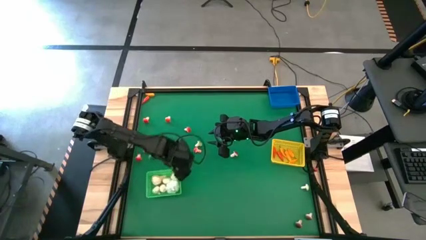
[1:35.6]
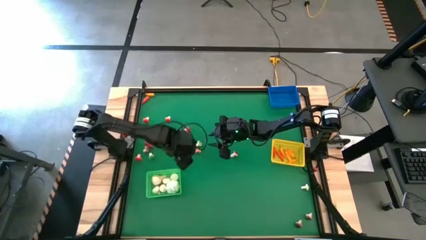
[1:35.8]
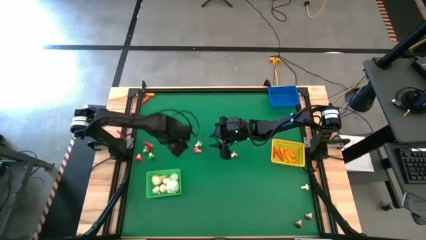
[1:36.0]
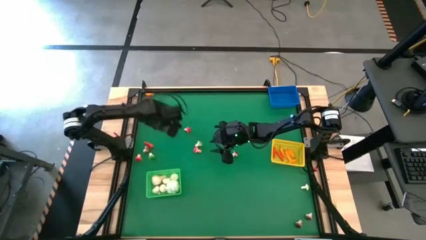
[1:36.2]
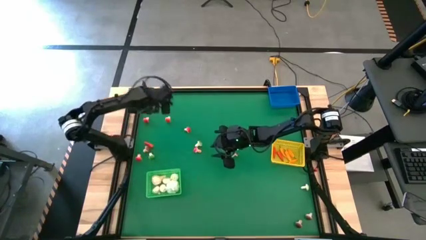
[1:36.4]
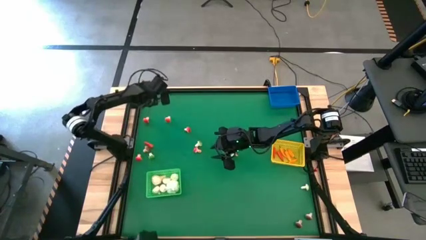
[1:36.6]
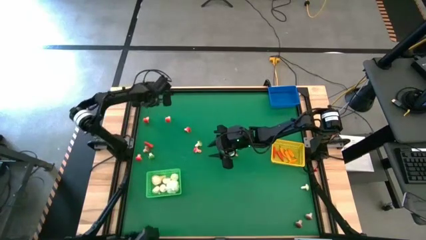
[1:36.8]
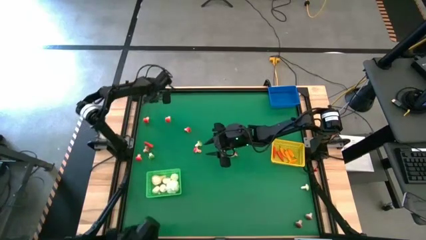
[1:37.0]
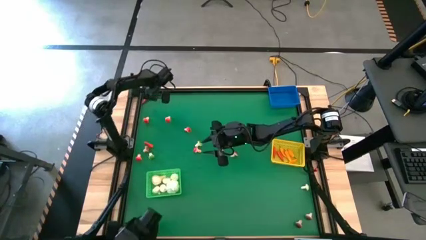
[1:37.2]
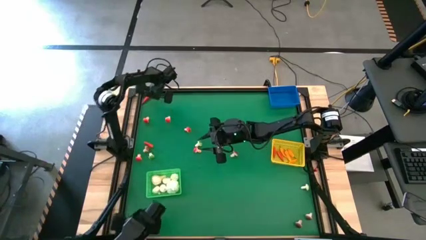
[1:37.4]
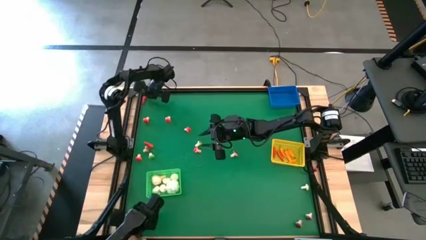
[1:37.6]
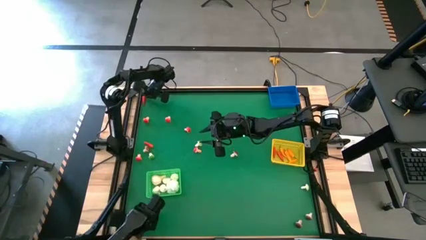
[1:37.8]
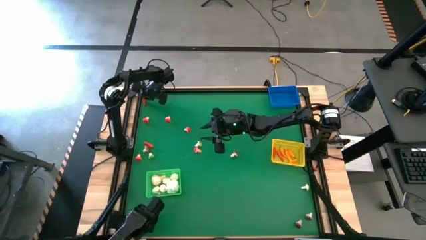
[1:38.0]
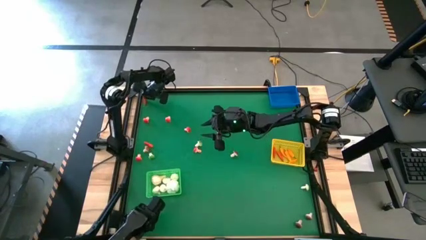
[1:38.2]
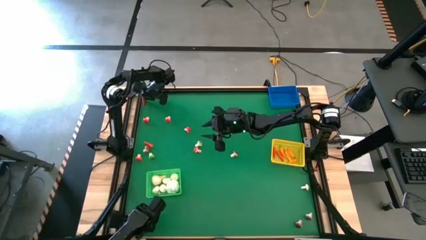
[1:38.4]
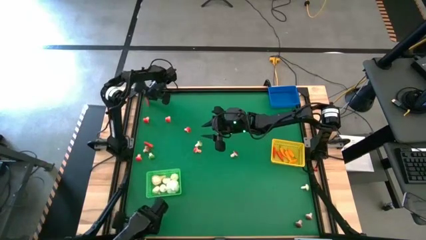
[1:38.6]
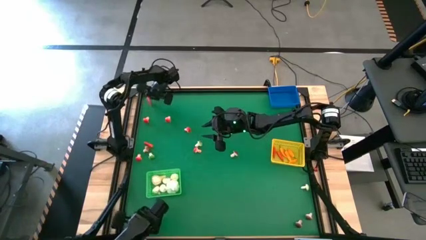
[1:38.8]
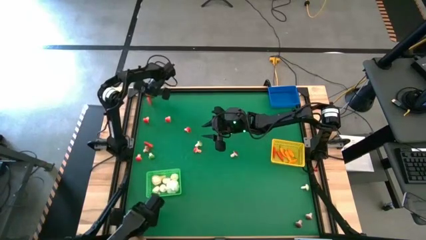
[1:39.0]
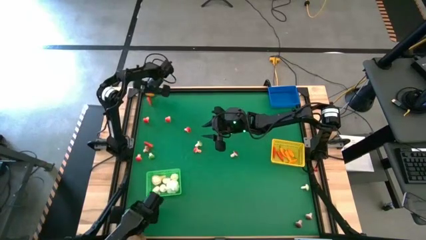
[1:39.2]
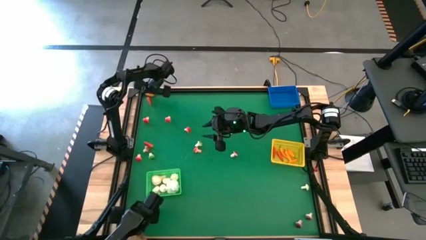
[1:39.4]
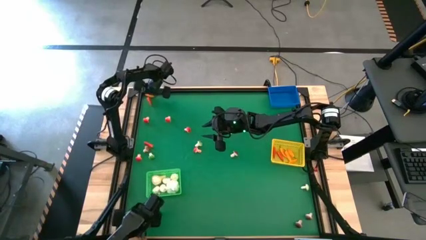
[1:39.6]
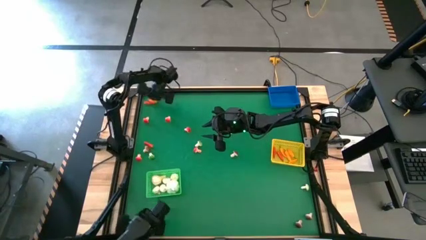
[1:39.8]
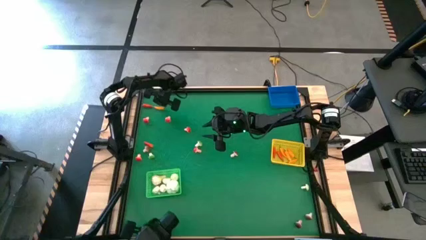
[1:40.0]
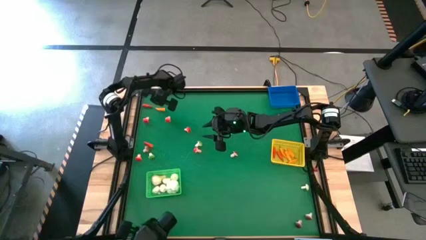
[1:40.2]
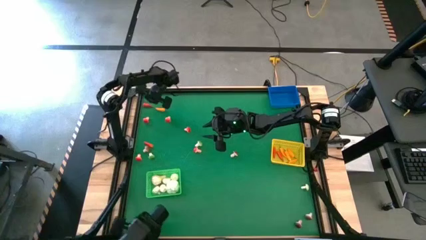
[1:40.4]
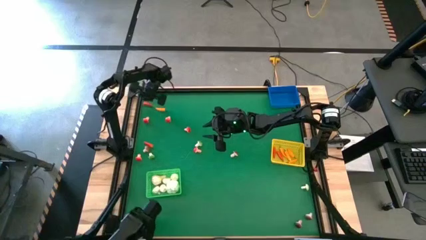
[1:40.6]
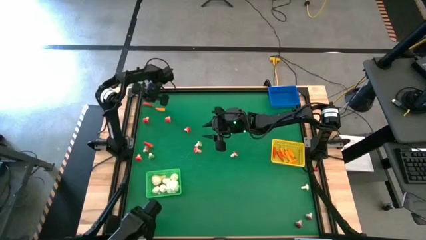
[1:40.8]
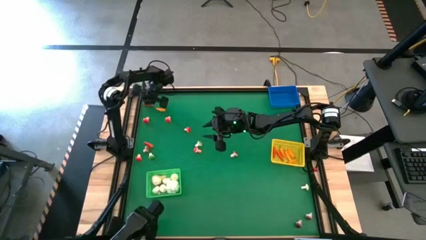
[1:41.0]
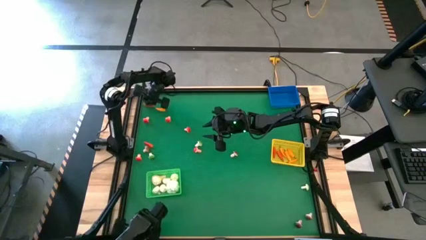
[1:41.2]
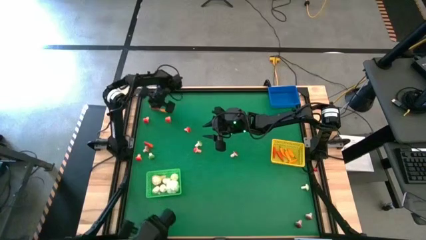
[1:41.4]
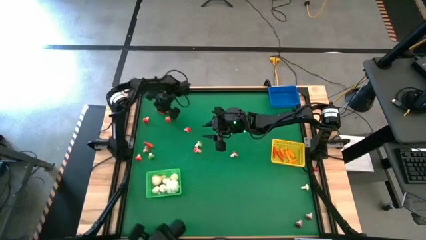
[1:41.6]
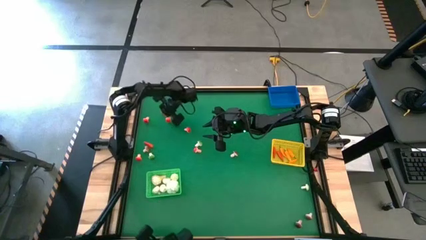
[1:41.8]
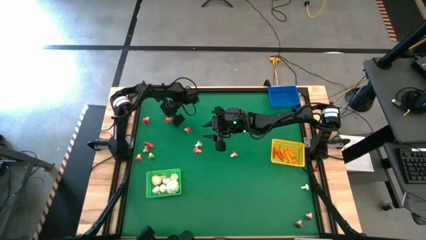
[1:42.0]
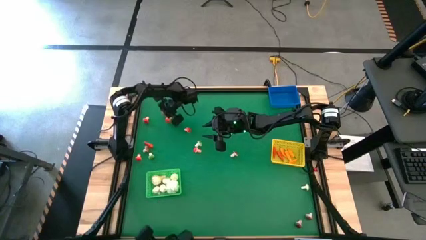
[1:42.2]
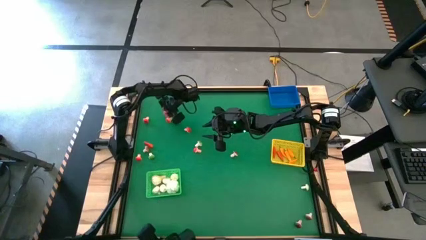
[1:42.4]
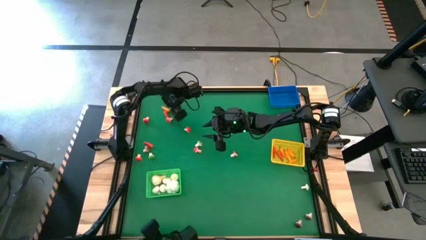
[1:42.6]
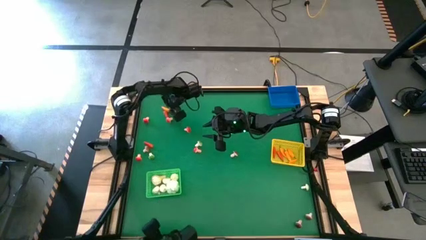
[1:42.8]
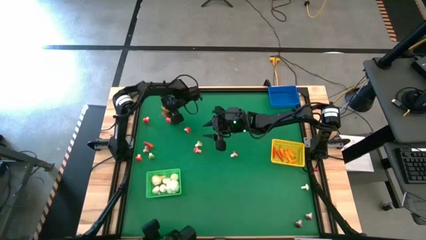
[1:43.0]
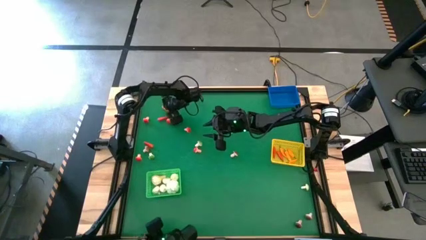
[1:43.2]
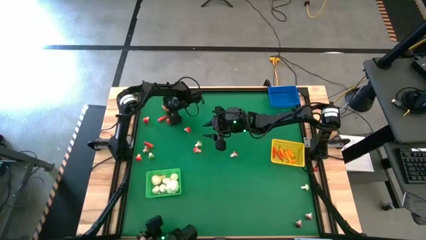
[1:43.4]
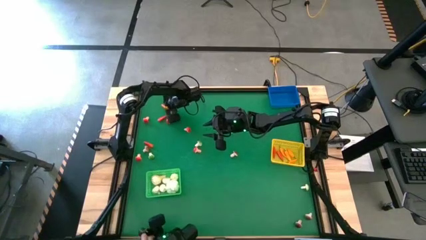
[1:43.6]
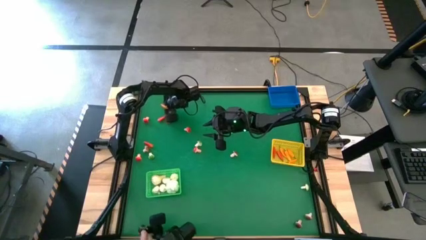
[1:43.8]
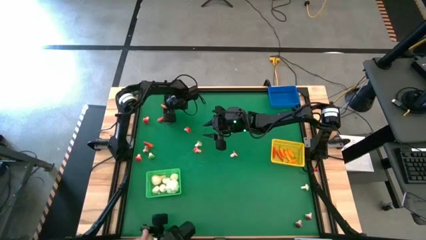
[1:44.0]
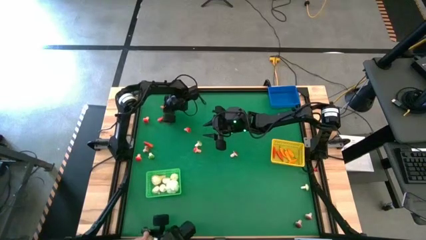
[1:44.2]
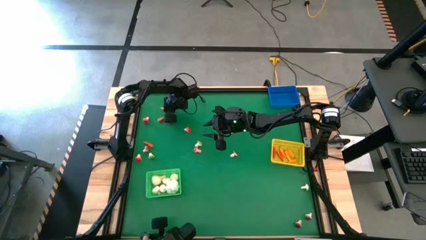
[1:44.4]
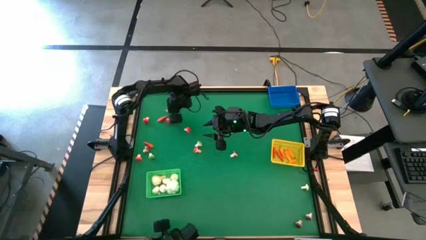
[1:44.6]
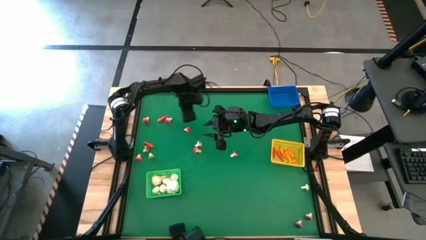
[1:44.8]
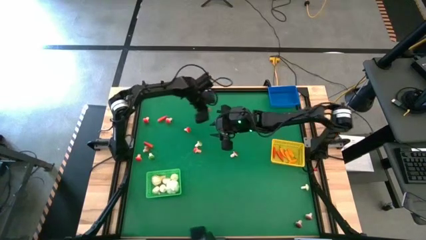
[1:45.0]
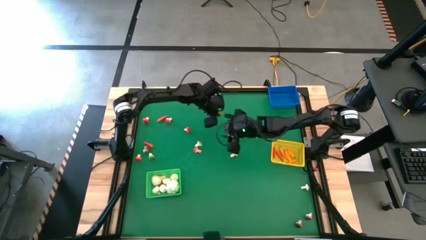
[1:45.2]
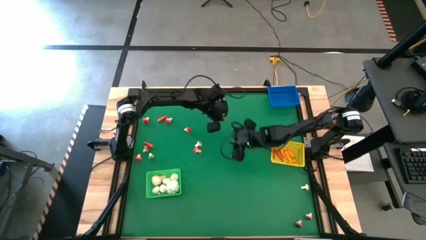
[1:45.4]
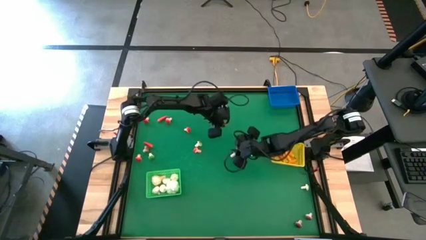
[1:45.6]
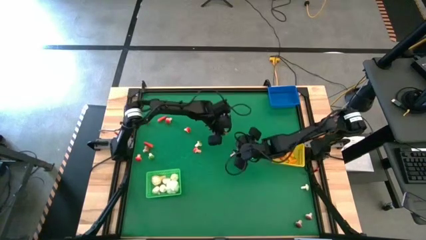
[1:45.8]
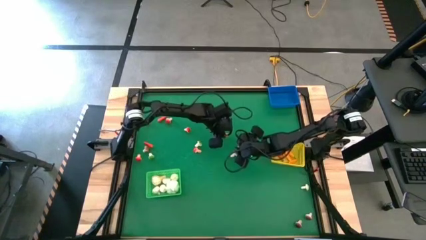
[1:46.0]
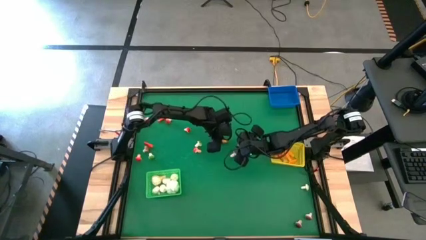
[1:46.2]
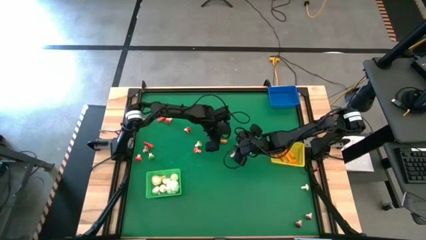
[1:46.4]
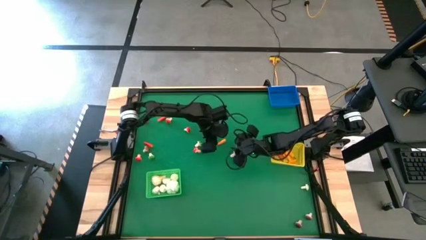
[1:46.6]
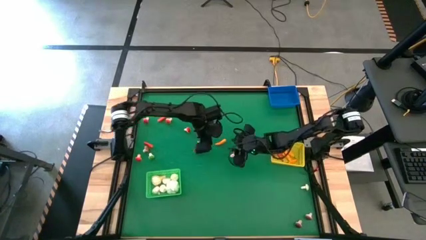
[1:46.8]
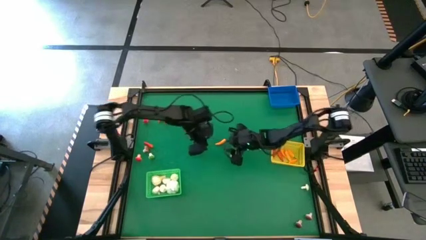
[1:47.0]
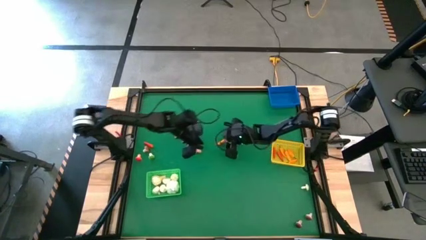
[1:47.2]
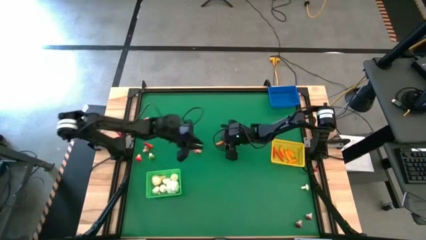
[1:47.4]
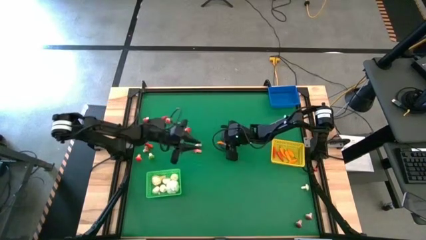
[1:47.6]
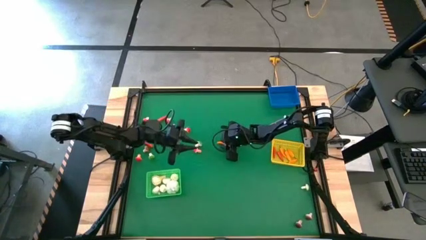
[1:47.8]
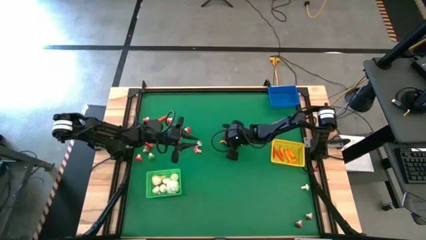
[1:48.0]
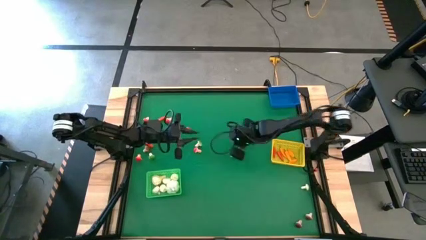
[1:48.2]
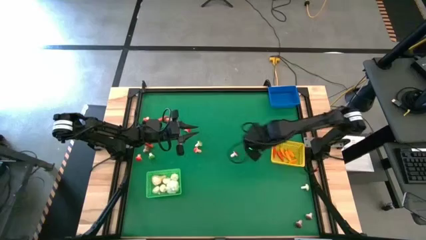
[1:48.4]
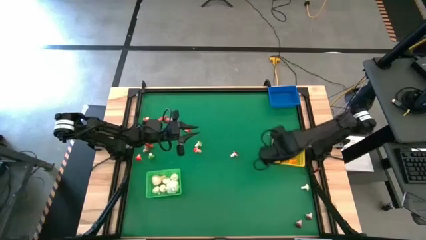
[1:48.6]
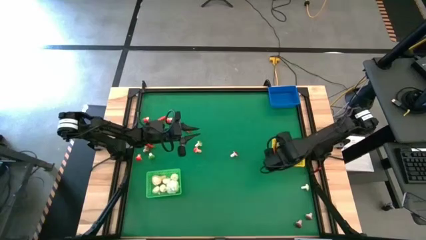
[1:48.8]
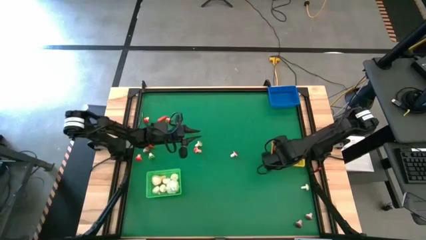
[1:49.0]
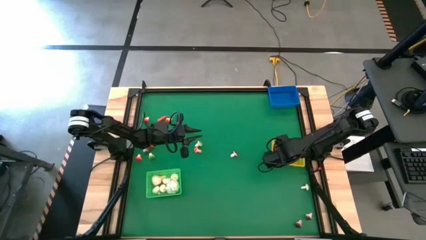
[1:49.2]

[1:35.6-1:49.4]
Task: Sort produce into baskets
Put the yellow chili into the yellow bin

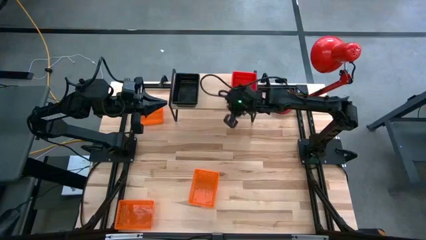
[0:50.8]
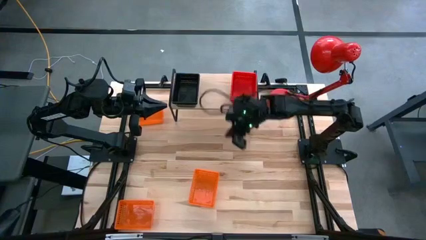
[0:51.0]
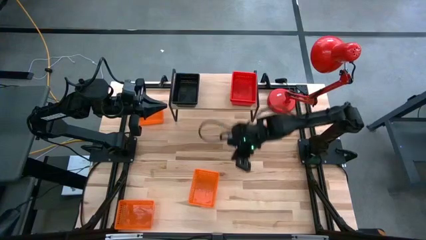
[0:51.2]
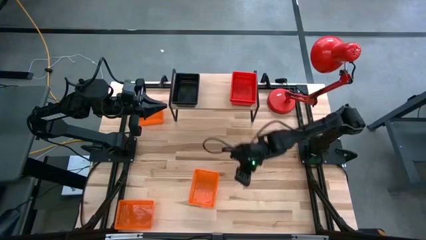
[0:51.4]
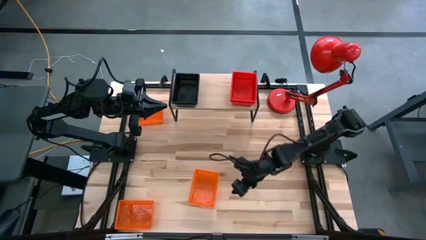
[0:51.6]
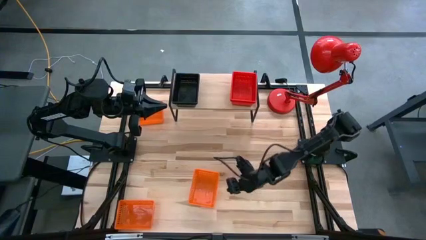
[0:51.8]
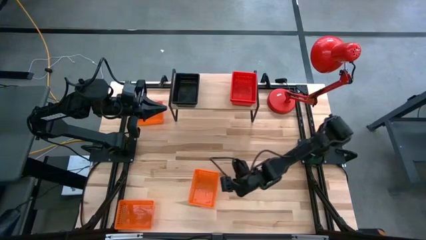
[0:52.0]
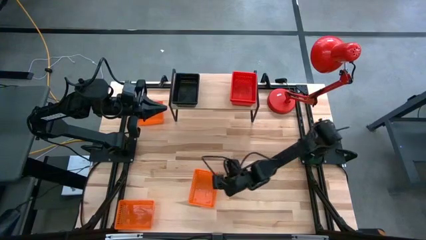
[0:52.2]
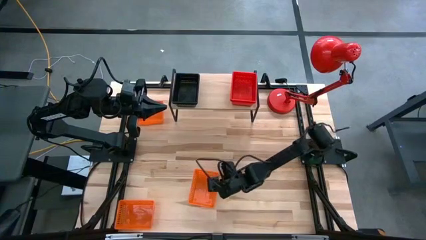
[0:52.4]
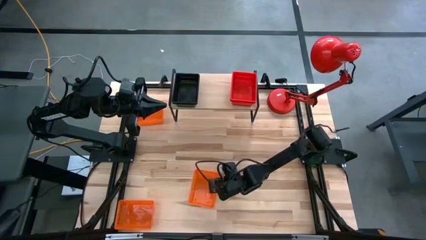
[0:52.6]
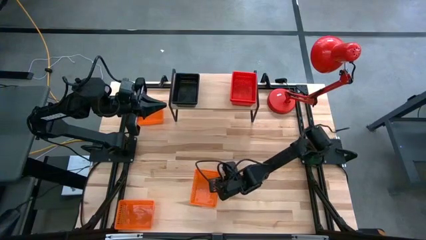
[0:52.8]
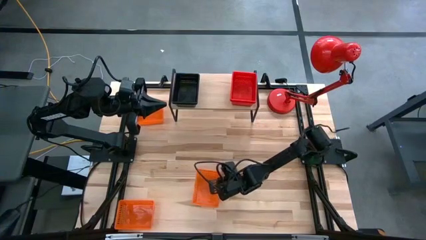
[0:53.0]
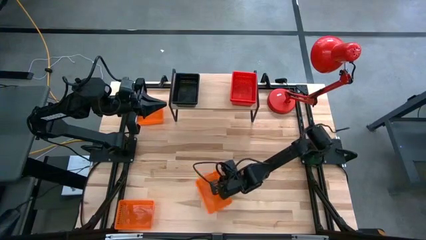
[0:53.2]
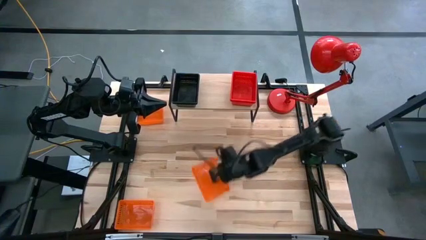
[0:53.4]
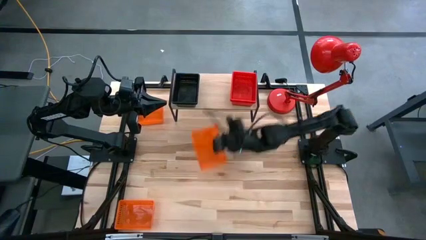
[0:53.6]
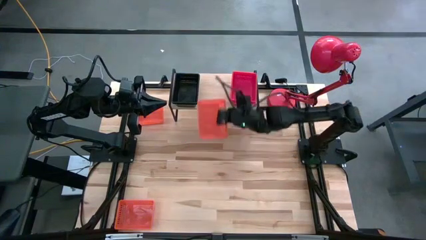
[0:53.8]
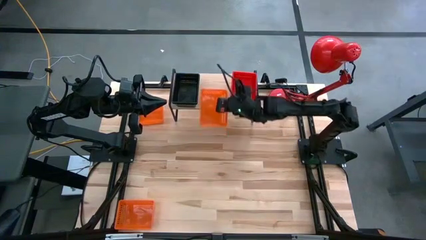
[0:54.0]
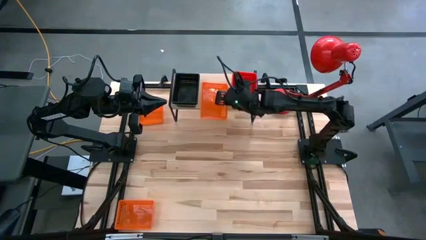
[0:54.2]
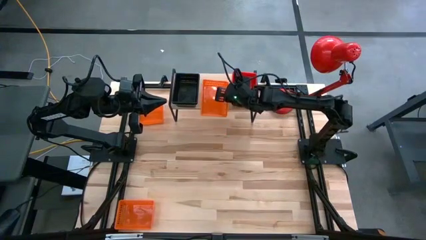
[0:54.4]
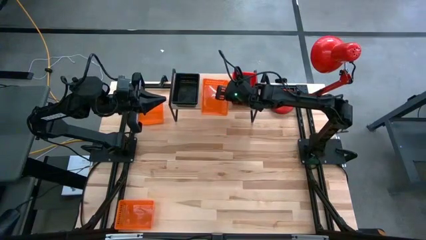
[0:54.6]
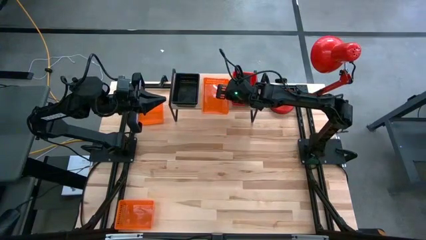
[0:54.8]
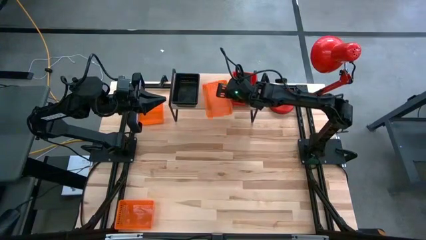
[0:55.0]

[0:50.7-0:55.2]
Task: Stack baskets on shelf by color
Put the right orange basket on the shelf
